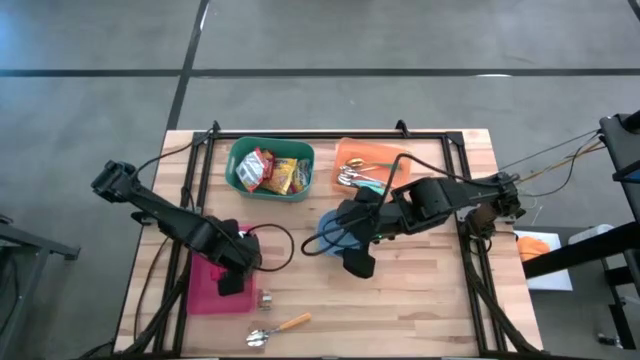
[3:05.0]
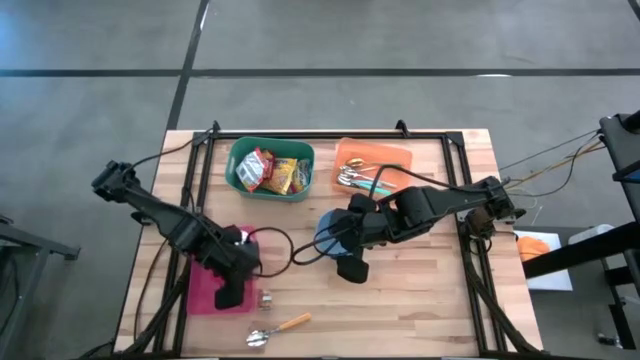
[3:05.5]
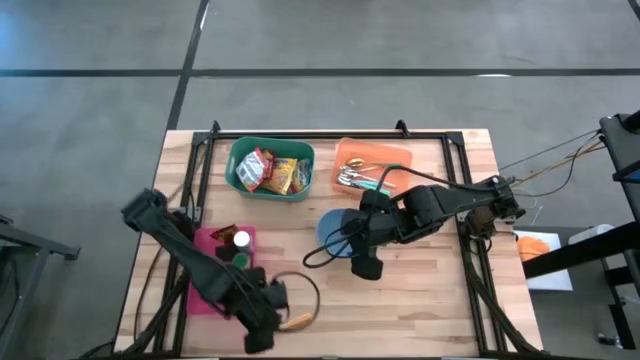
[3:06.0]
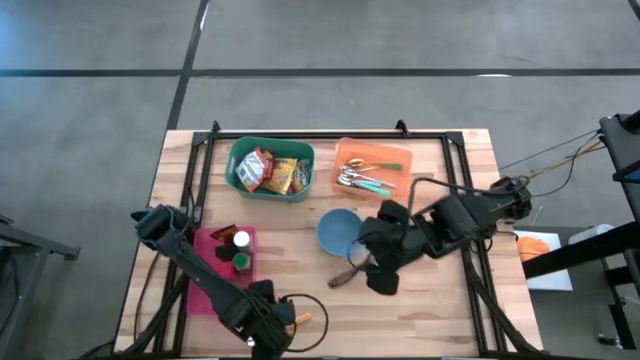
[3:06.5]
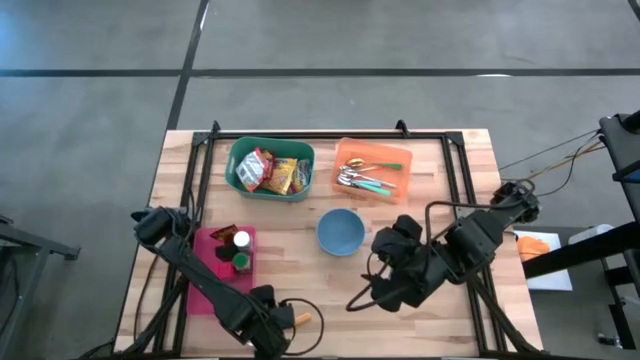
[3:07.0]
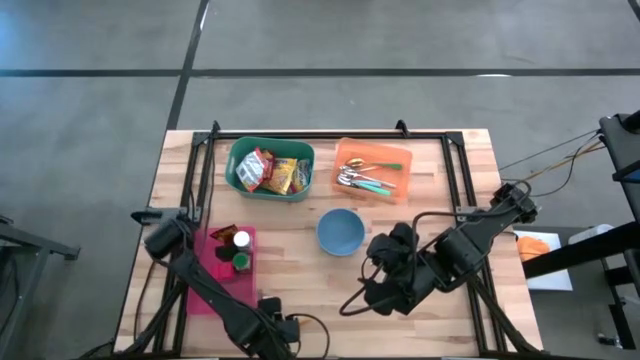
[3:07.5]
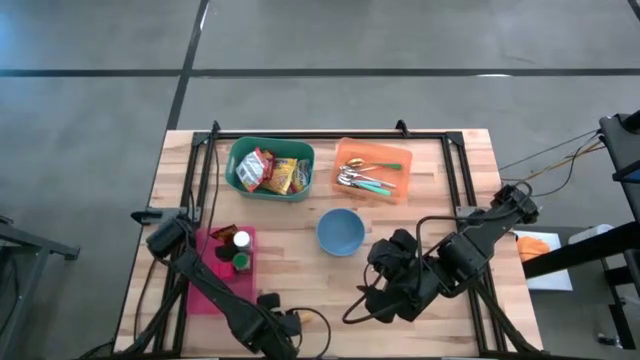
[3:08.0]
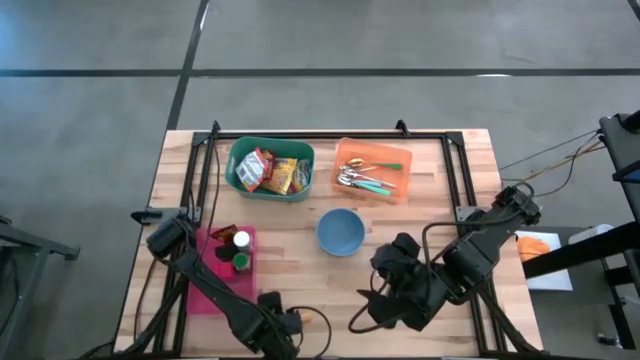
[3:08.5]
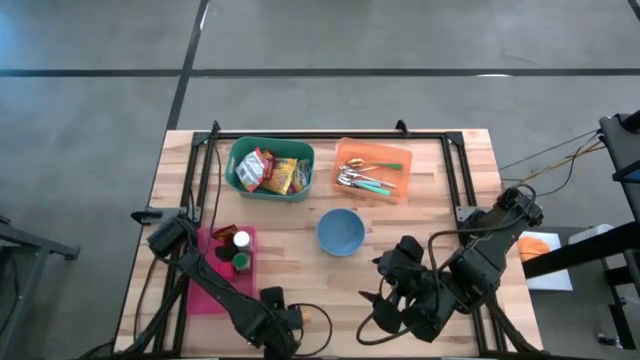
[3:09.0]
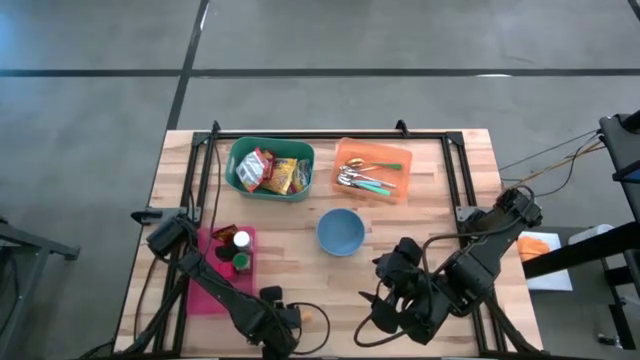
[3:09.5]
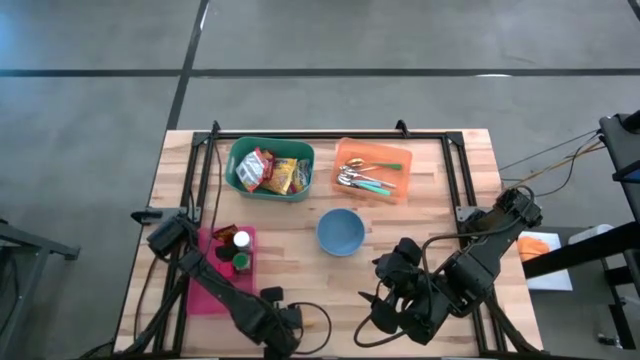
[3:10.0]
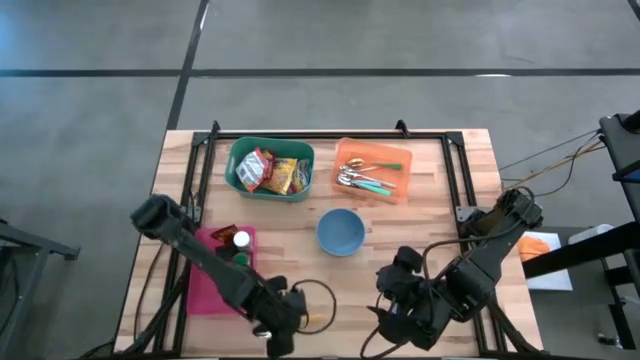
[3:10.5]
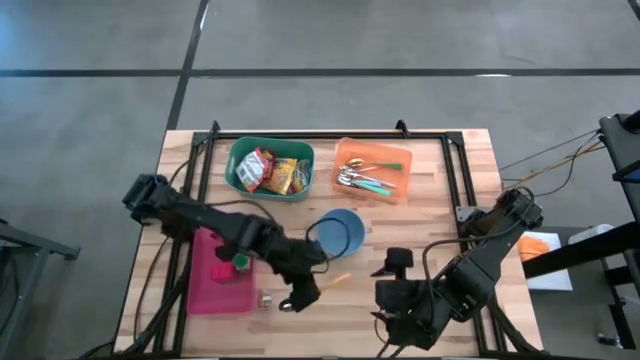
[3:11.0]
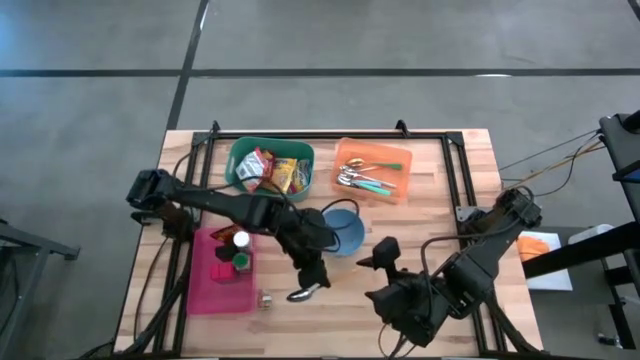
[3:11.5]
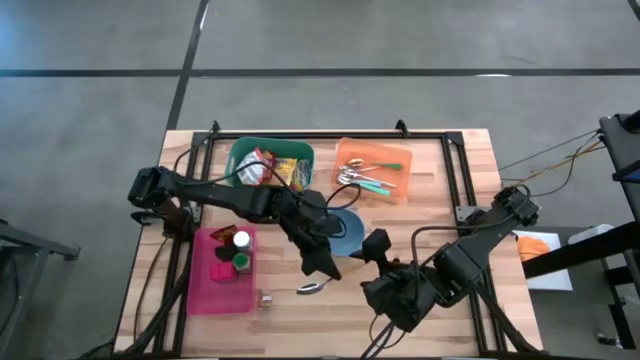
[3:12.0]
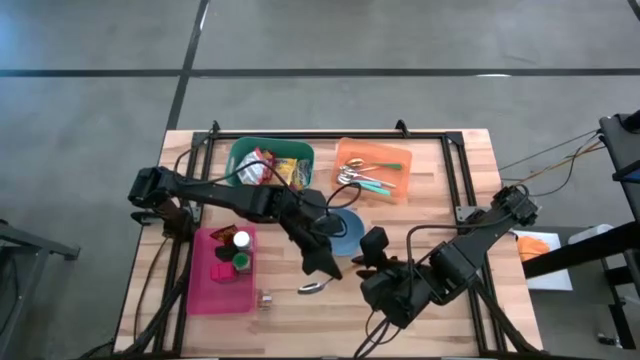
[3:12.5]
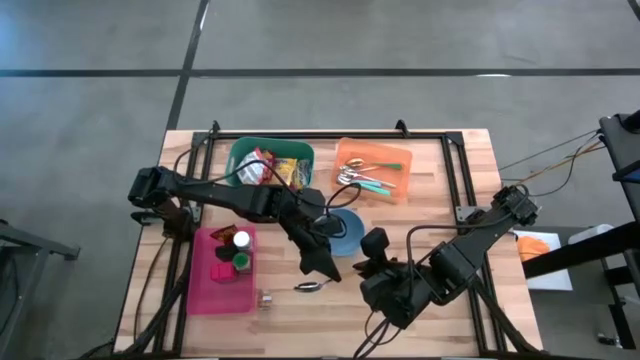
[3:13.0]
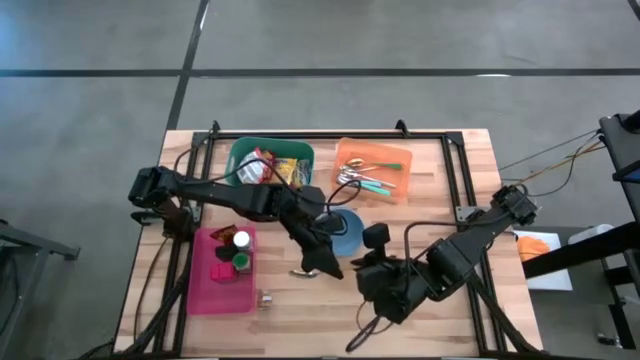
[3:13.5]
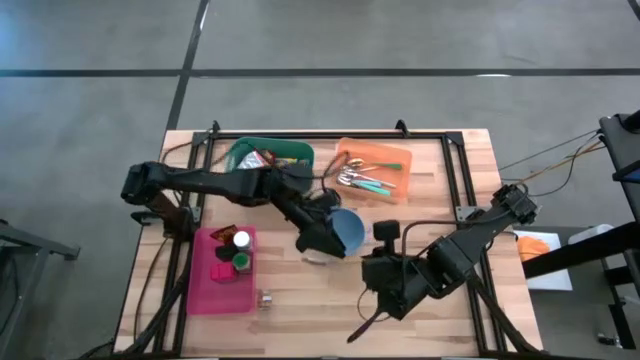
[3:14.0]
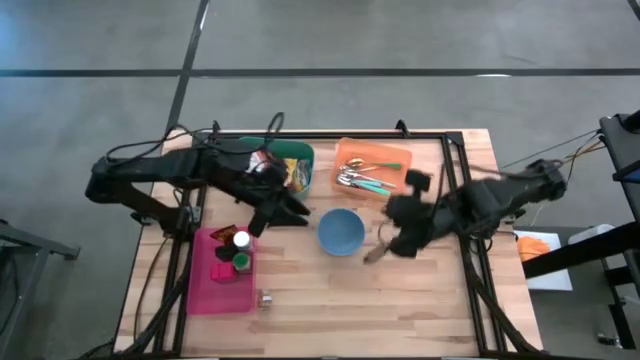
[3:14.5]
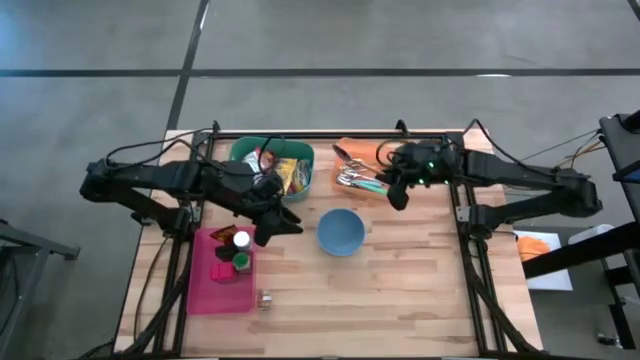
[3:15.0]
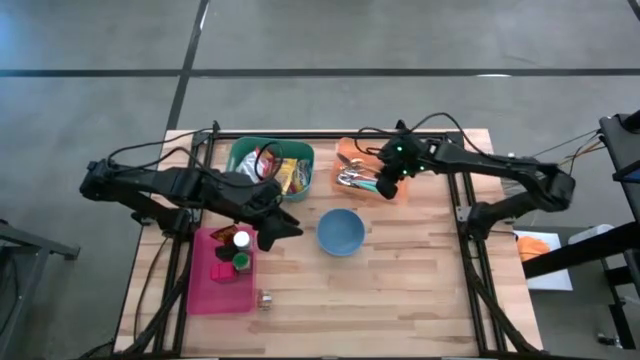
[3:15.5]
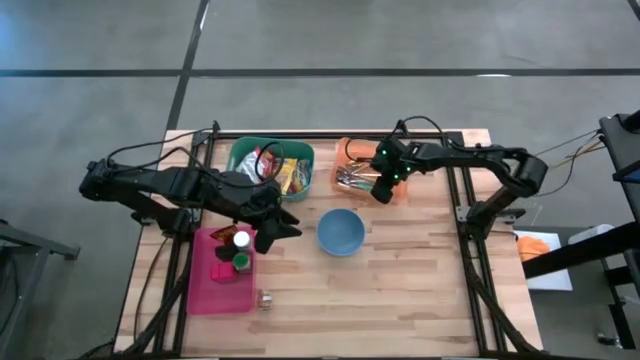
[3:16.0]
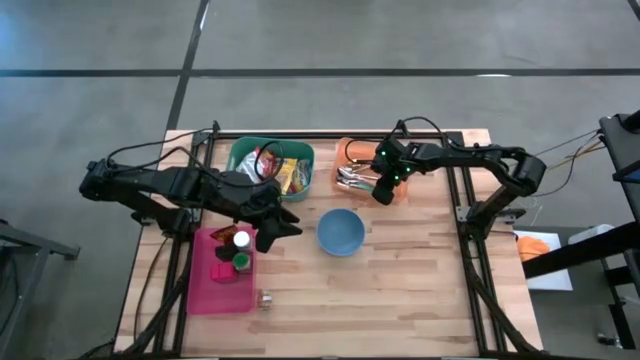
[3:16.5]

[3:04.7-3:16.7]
Put the yellow spoon into the orange bin

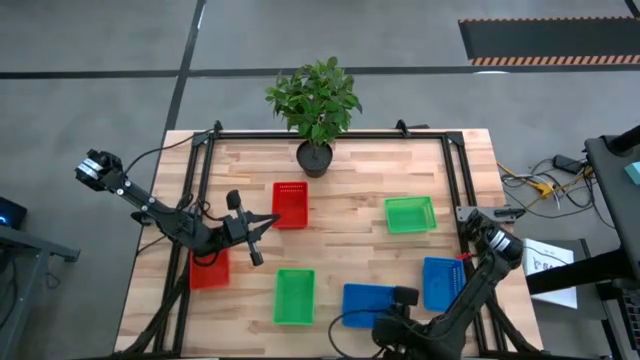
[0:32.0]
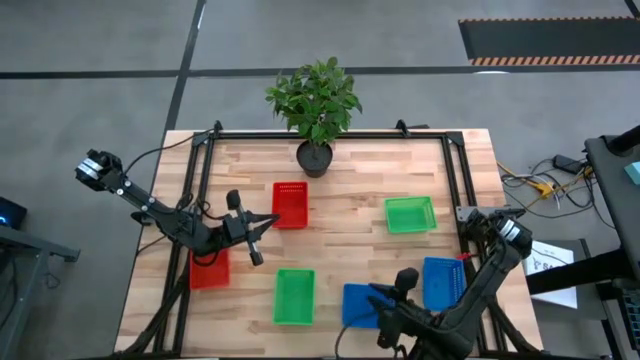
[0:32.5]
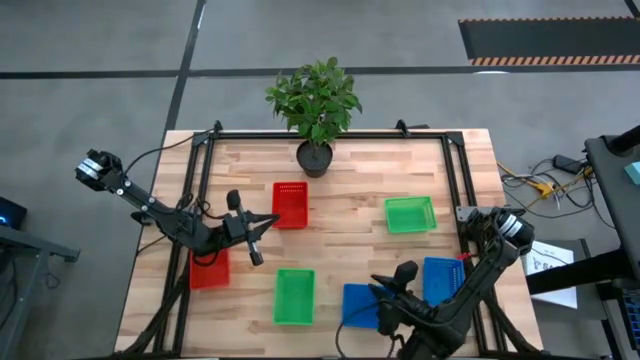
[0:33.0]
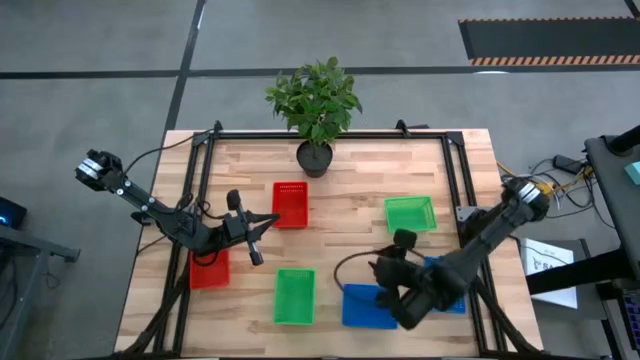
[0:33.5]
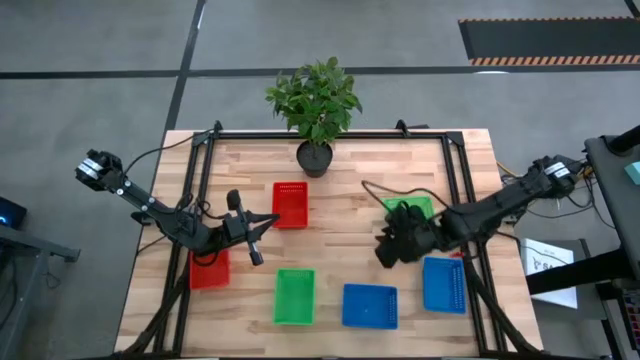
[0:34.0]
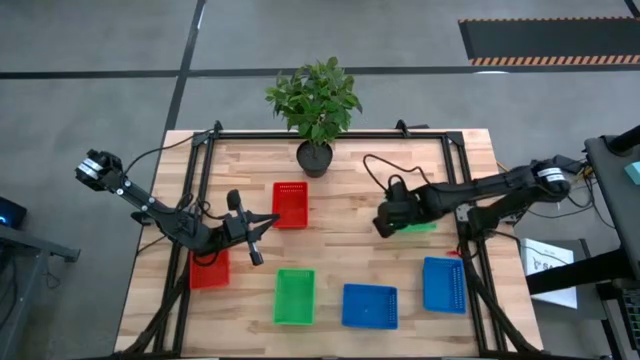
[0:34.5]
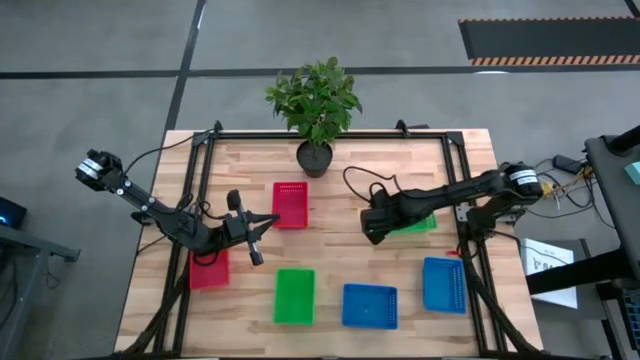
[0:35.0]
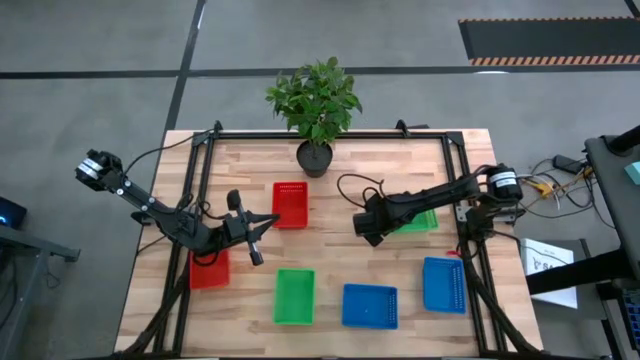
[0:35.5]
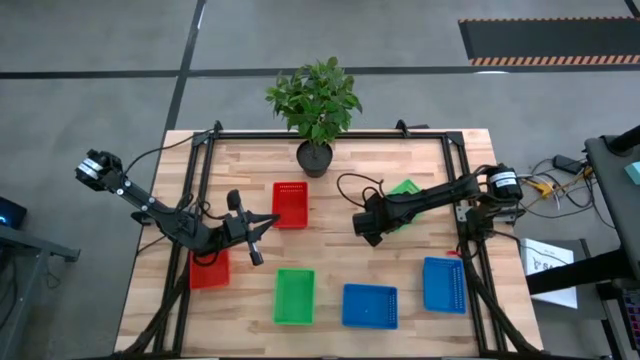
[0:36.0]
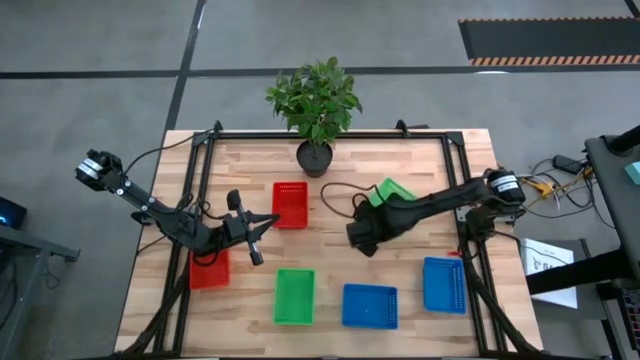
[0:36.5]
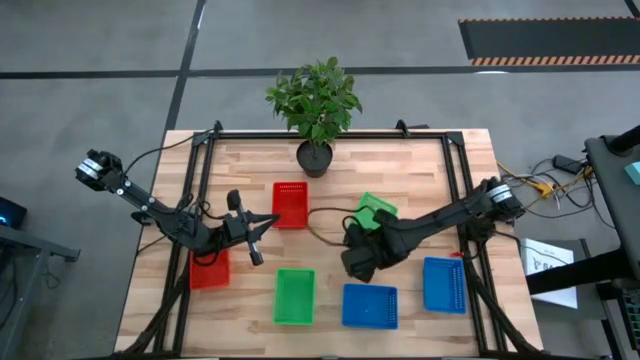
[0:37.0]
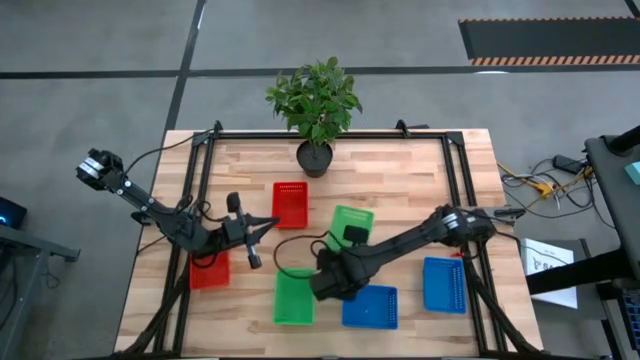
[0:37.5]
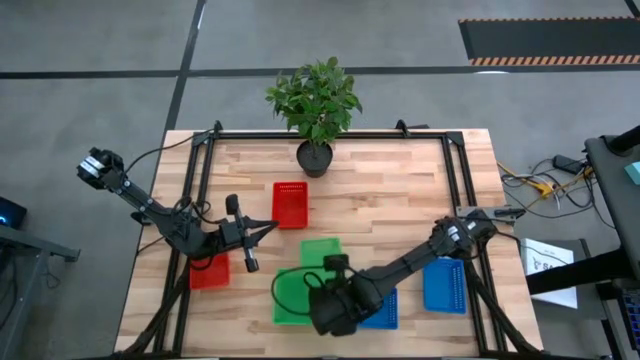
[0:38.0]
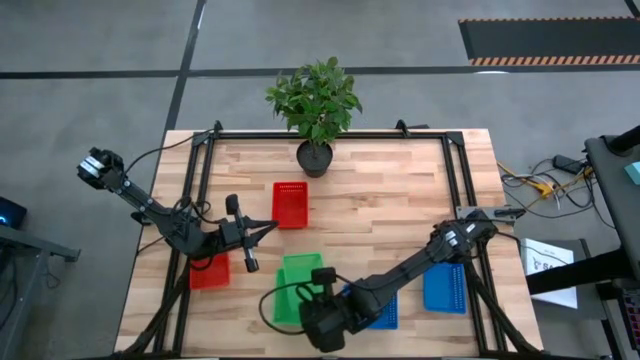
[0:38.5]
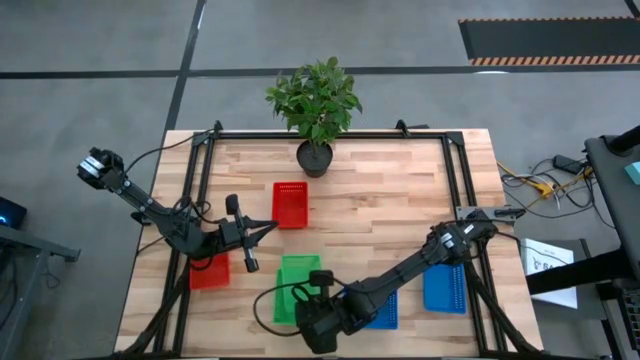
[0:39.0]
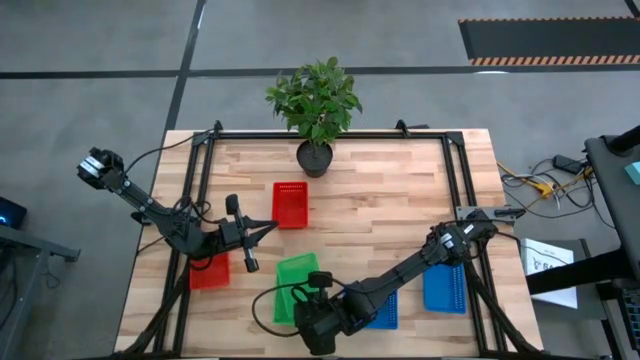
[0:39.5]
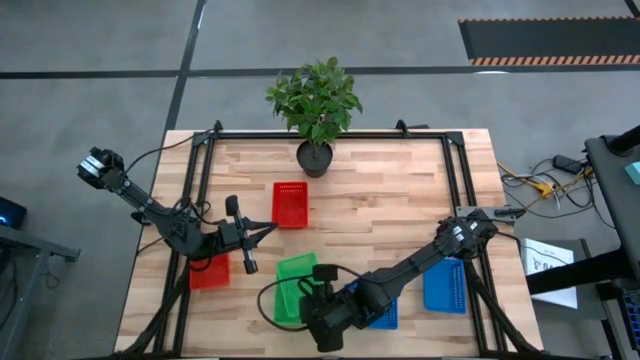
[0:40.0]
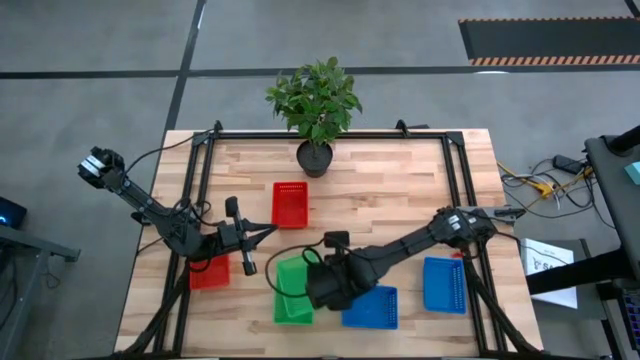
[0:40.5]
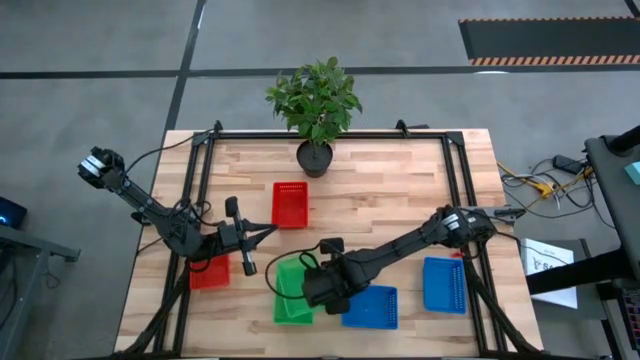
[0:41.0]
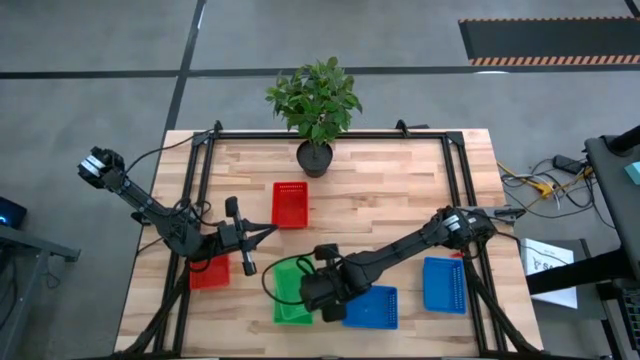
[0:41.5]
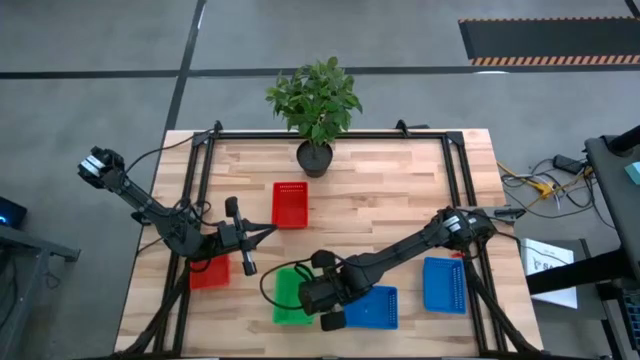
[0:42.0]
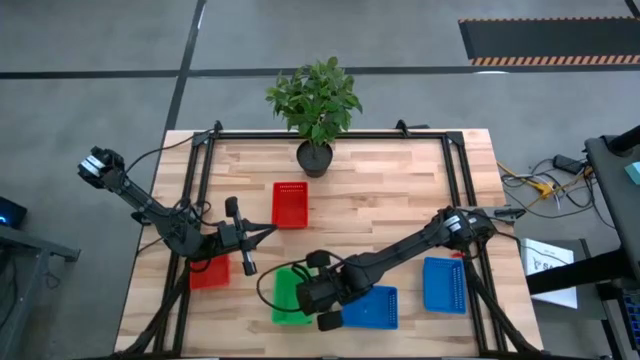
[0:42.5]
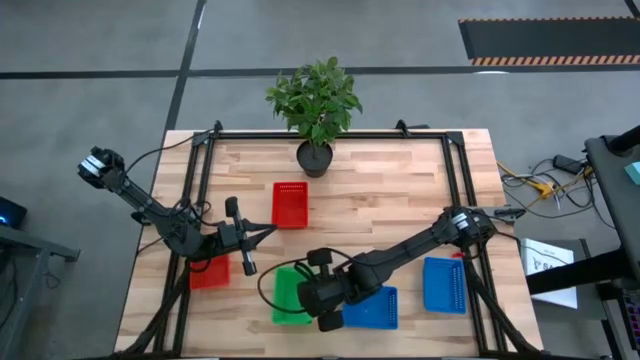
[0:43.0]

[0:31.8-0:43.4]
Stack the top green basket on top of the bottom green baskets
